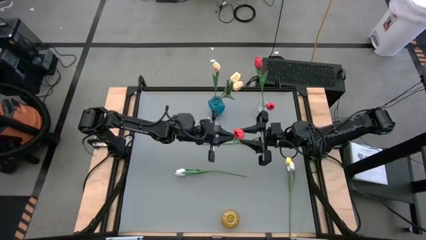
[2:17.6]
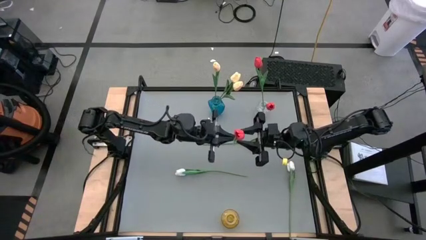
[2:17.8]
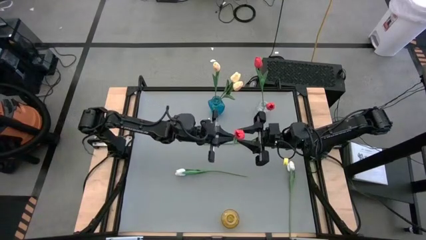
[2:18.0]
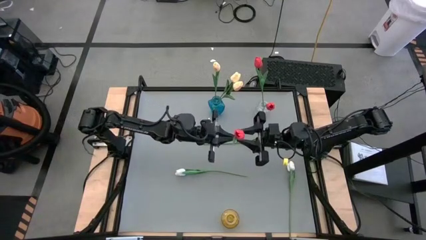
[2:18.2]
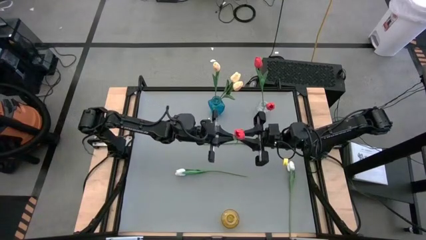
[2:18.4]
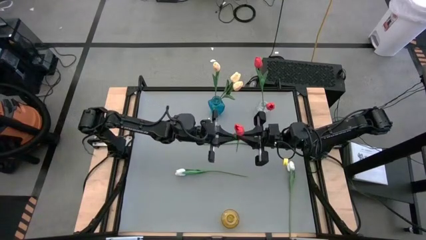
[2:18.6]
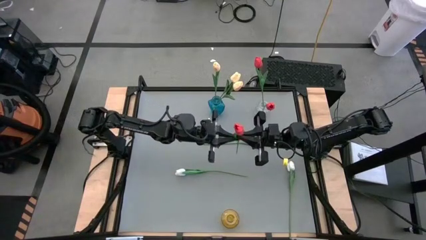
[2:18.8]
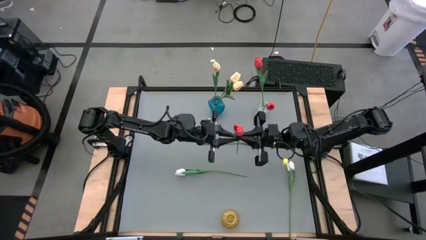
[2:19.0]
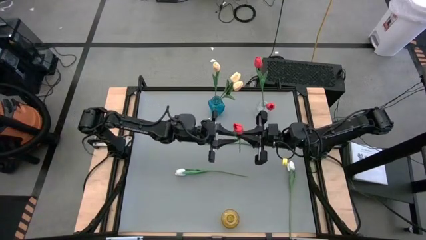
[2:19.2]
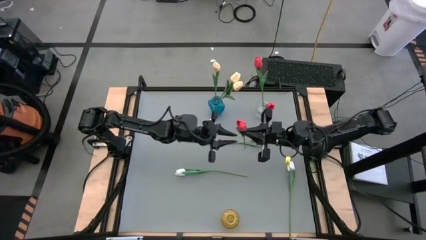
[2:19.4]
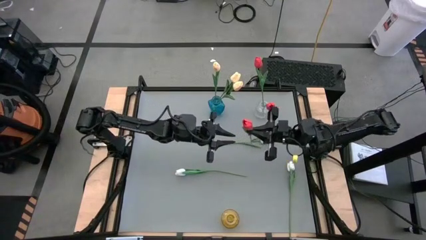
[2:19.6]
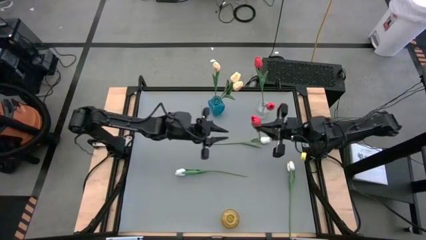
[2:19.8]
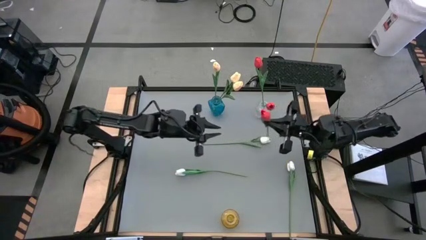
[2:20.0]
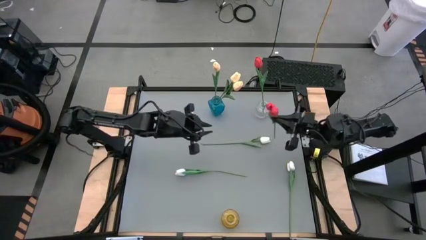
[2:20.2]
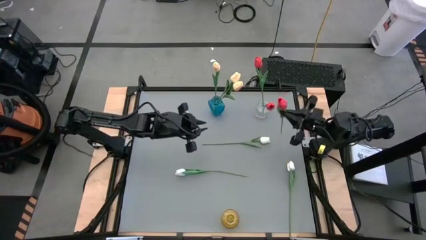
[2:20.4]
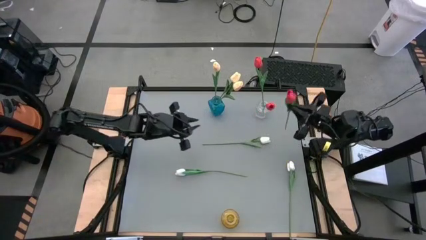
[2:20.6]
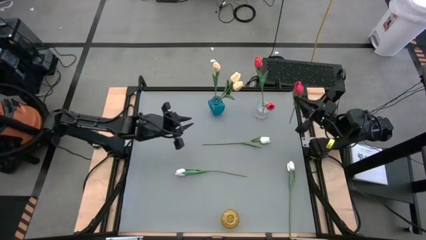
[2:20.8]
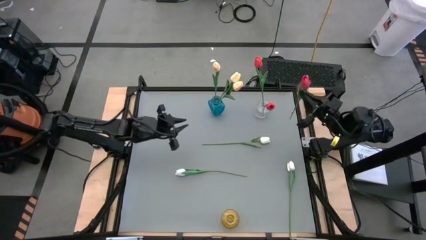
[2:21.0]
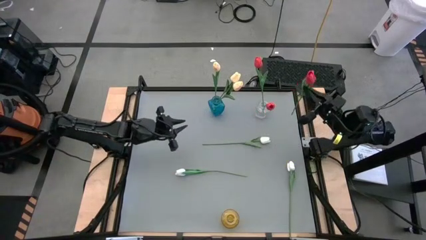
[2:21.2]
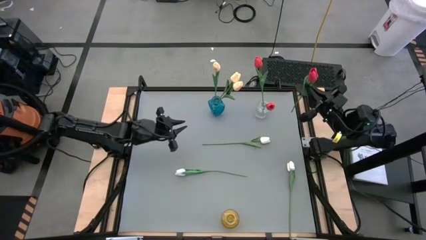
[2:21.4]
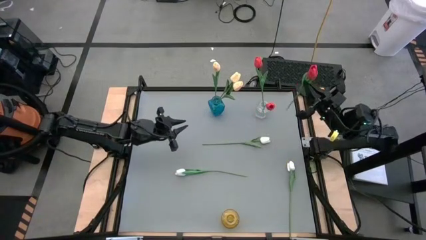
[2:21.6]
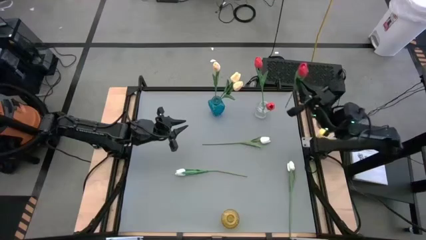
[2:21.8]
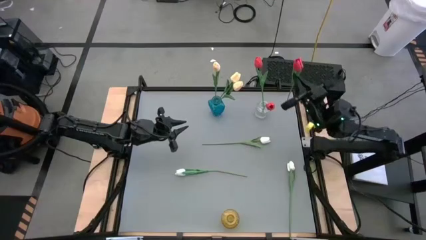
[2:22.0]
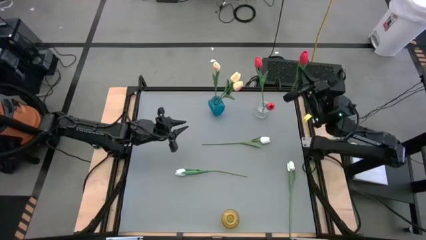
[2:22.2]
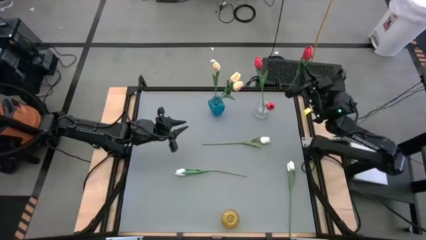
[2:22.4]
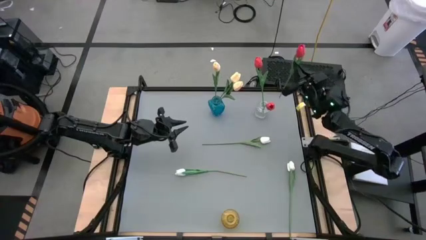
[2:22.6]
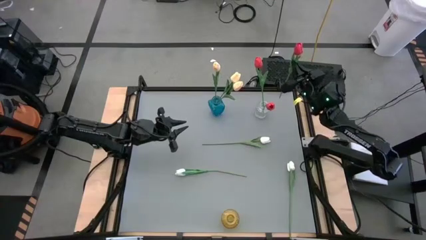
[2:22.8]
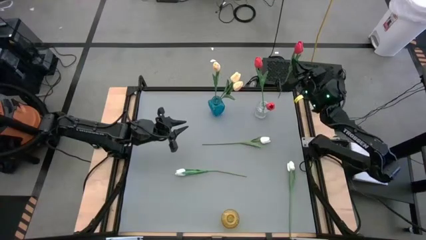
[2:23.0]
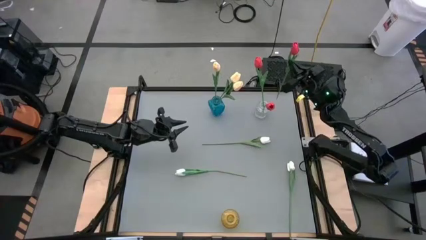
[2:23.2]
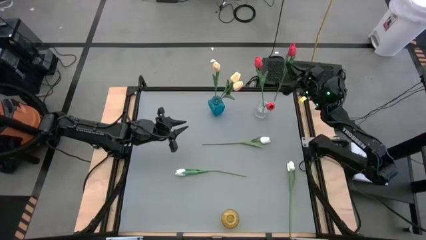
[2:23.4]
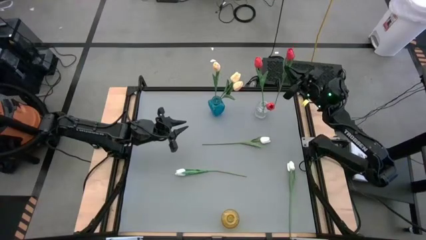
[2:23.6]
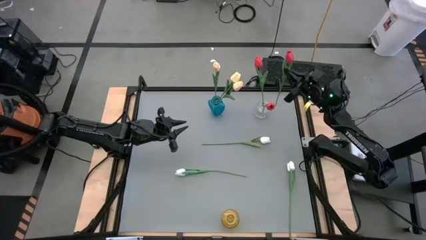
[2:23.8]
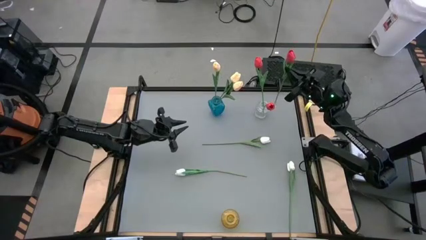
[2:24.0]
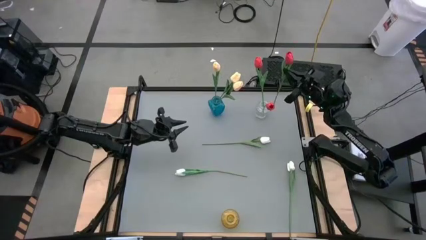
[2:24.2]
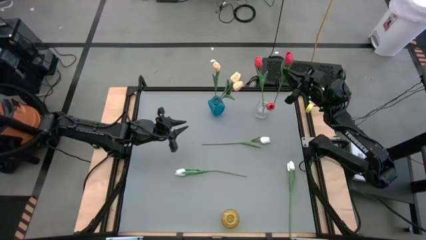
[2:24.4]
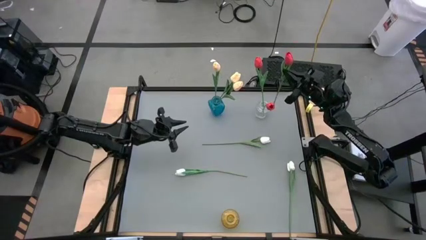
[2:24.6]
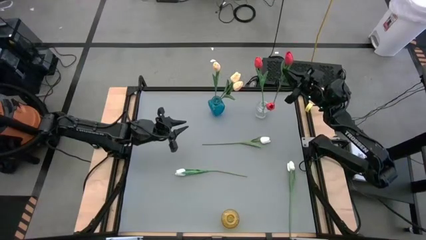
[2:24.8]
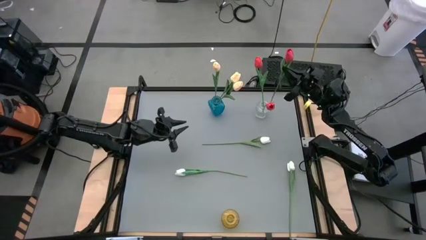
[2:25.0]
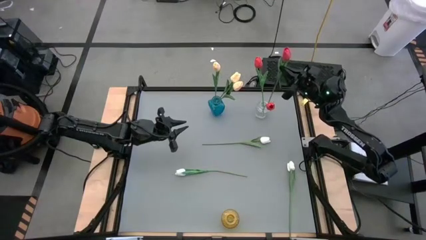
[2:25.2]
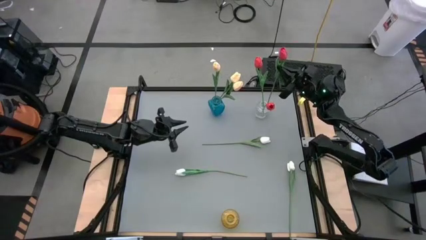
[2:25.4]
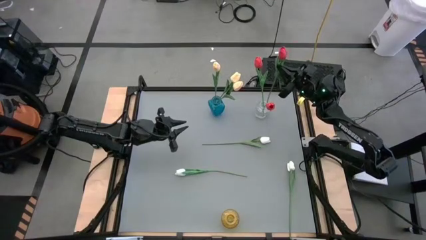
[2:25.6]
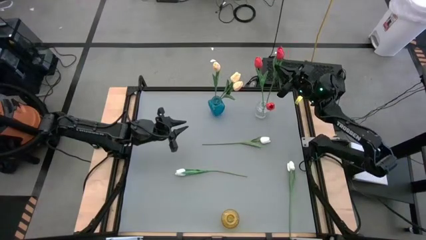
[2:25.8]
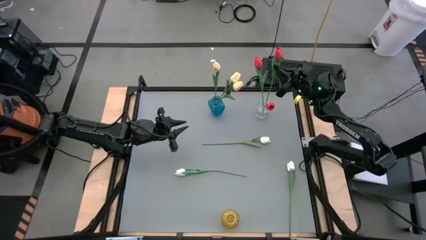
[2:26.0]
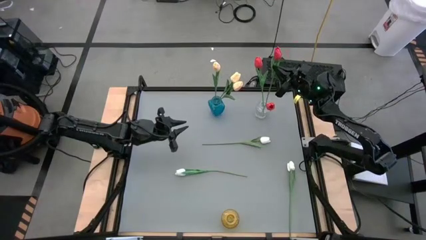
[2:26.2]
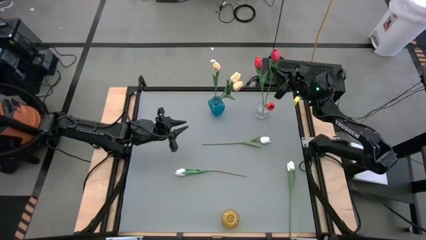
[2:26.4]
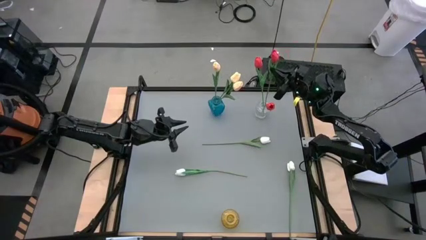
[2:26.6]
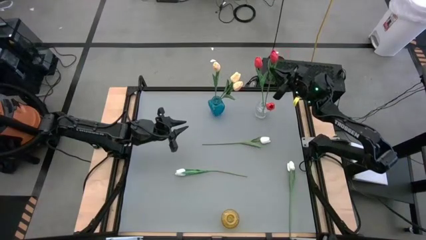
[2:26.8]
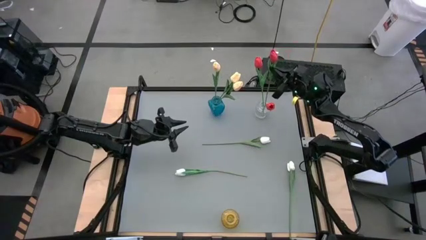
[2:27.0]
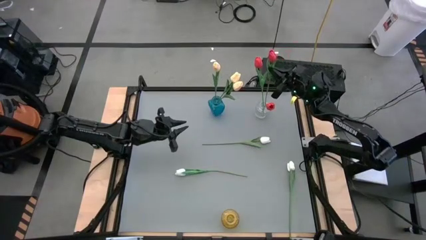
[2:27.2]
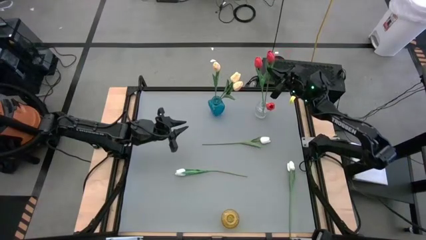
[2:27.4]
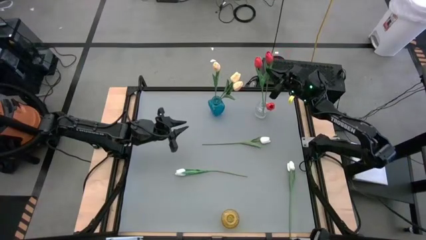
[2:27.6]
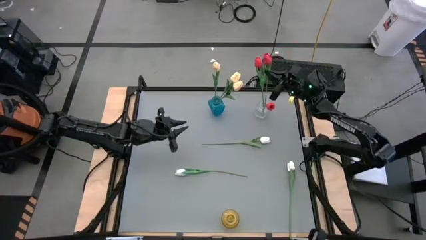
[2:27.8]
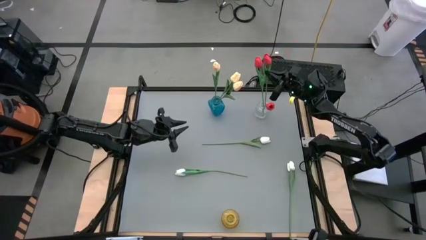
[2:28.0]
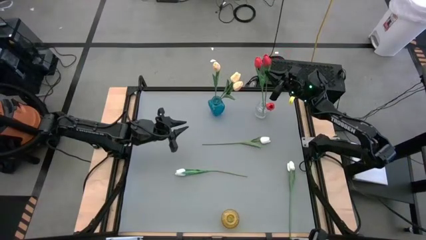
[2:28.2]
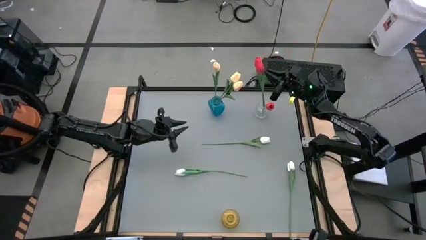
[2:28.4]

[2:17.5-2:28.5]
Task: Sort flowers into vase by color
Put the red flower into the transparent vase

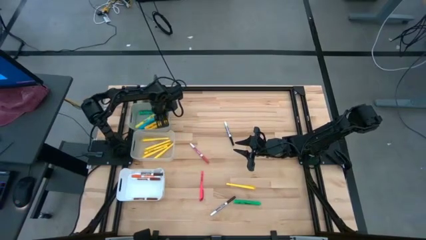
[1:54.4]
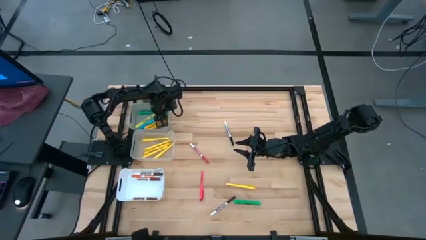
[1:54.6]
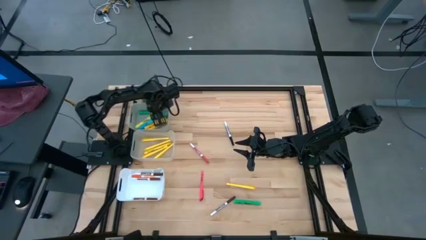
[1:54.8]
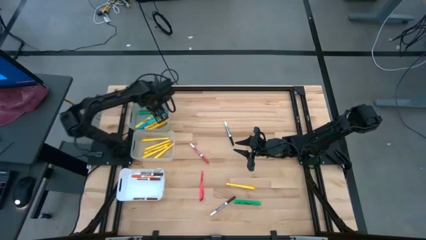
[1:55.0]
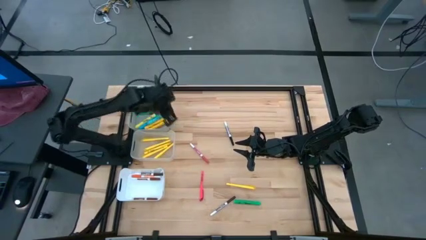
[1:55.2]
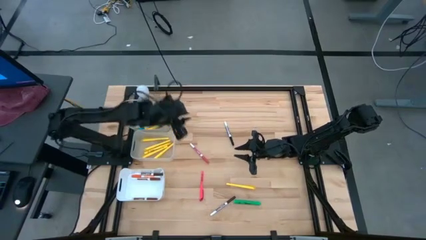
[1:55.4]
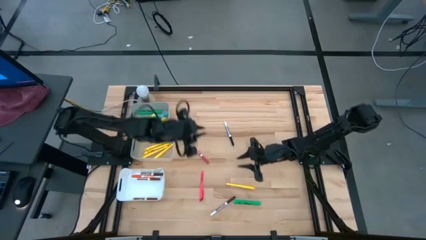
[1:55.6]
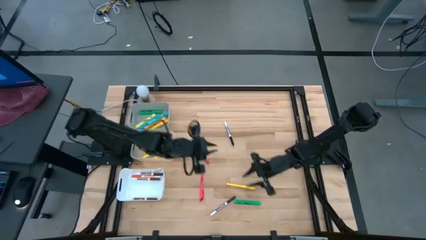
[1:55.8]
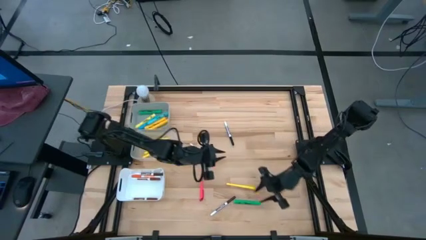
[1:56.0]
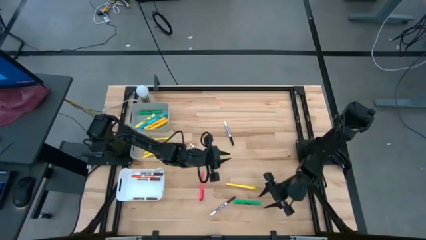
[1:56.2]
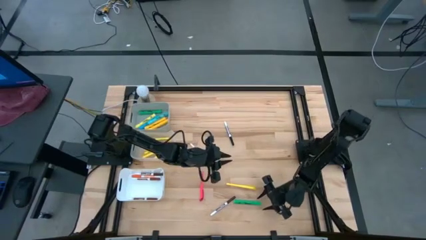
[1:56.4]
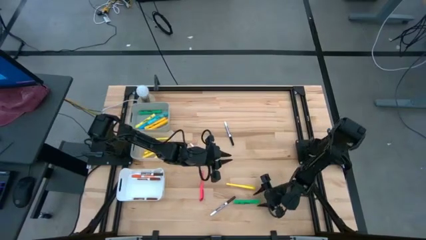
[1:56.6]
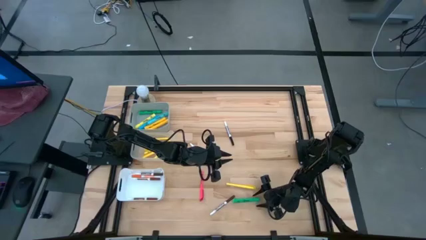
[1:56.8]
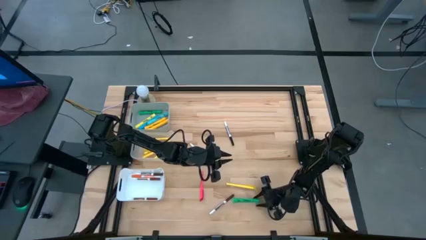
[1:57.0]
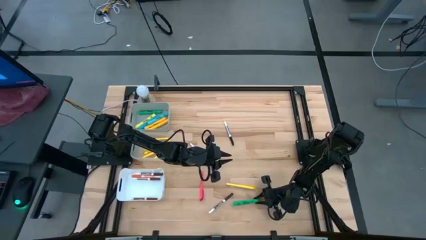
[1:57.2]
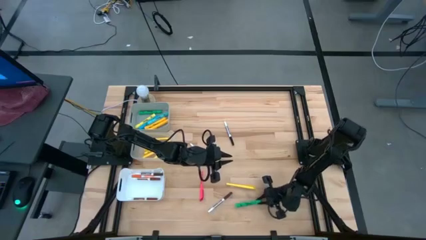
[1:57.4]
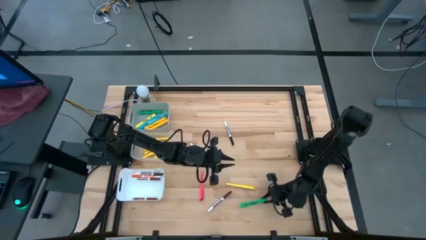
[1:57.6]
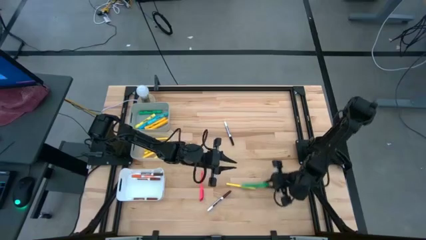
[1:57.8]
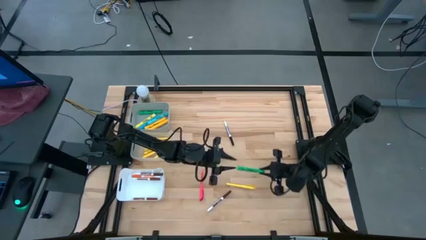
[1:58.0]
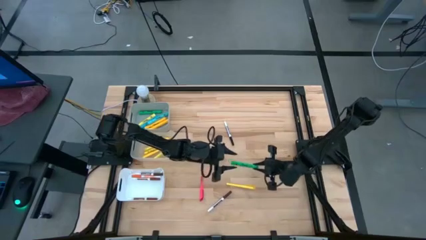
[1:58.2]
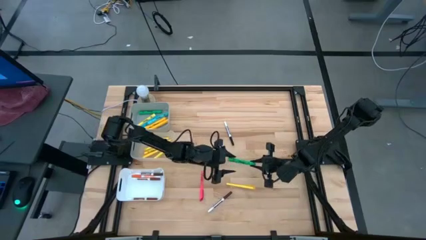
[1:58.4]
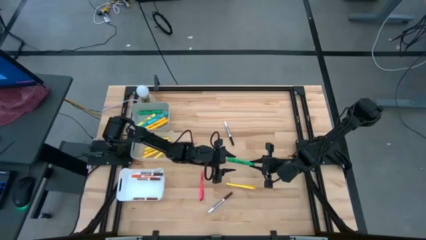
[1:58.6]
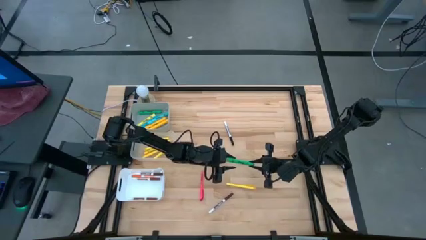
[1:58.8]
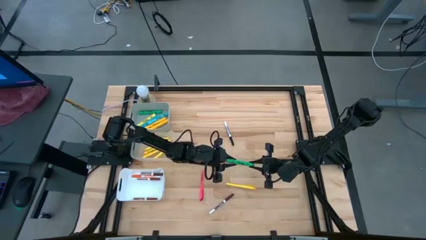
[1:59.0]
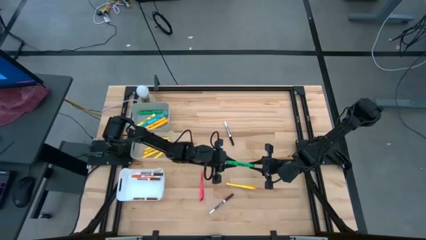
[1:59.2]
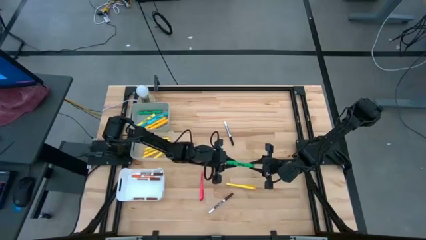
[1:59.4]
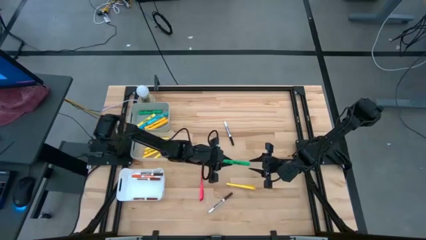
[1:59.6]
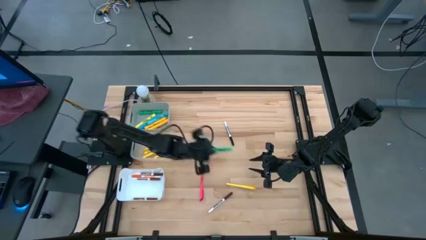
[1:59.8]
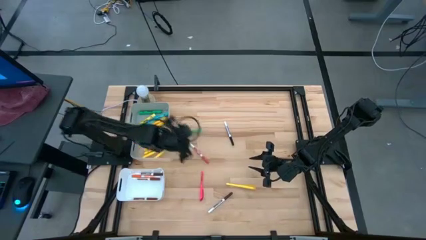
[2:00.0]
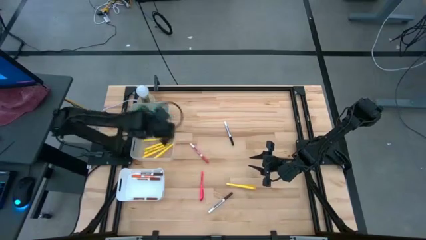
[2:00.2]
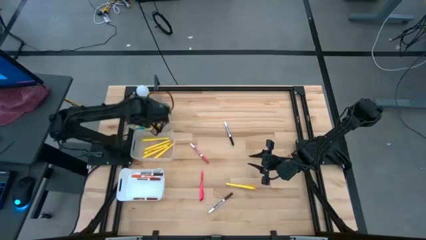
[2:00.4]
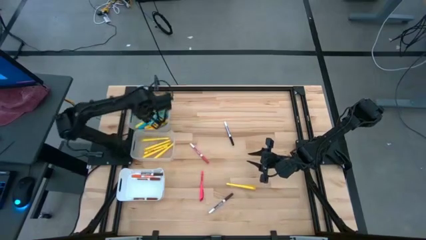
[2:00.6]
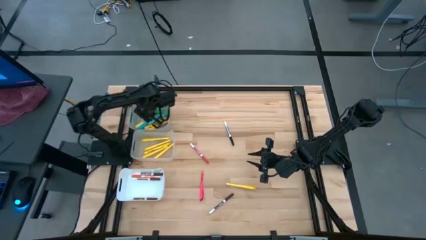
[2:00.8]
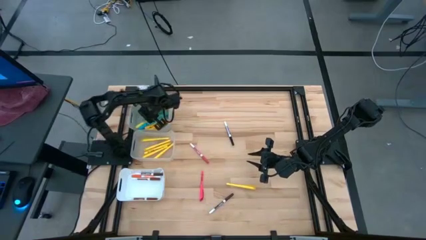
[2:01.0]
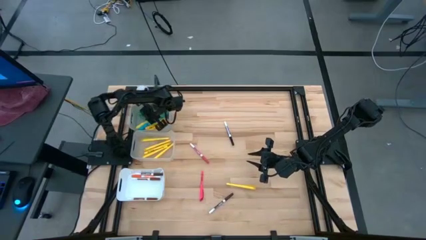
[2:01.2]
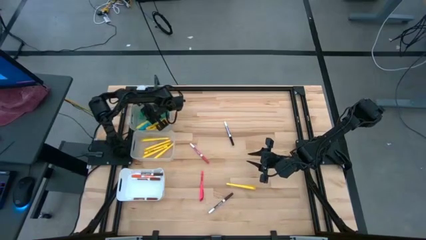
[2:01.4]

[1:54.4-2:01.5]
Task: Pick & Place Markers
Put the green highlighter into the gray bin
